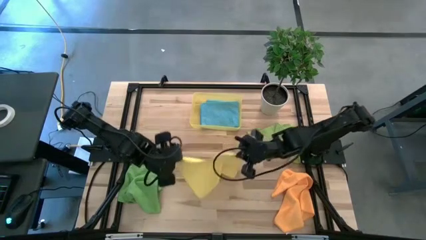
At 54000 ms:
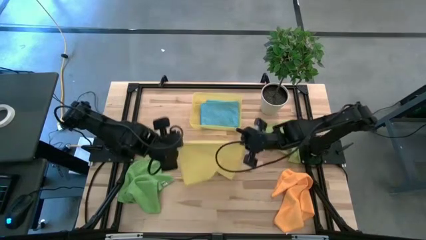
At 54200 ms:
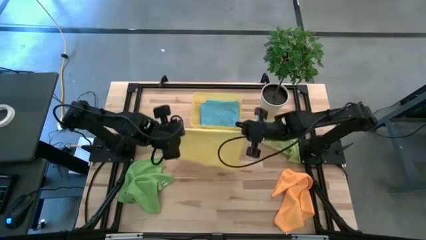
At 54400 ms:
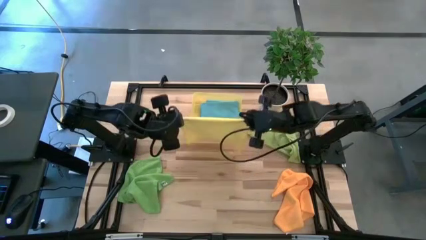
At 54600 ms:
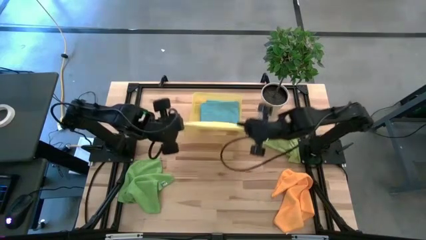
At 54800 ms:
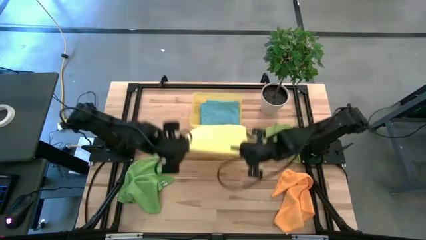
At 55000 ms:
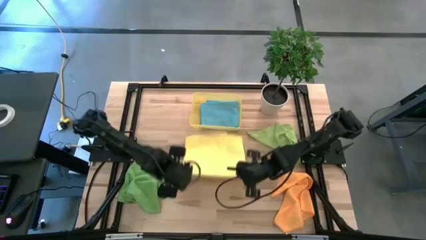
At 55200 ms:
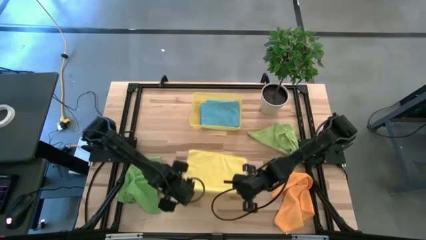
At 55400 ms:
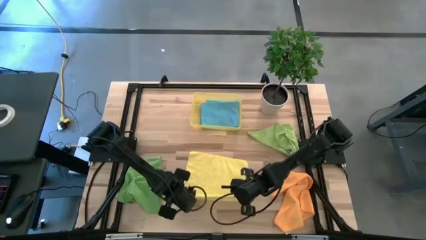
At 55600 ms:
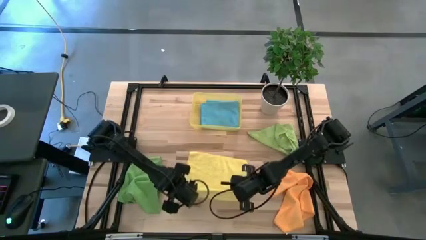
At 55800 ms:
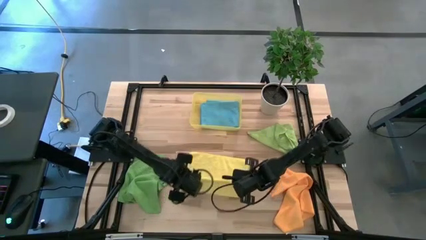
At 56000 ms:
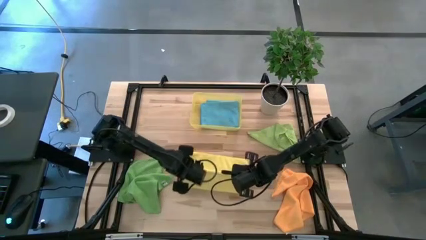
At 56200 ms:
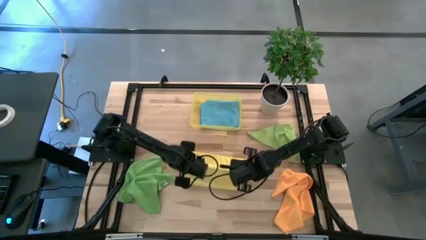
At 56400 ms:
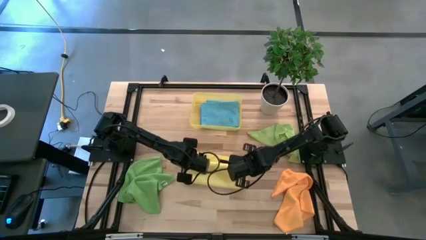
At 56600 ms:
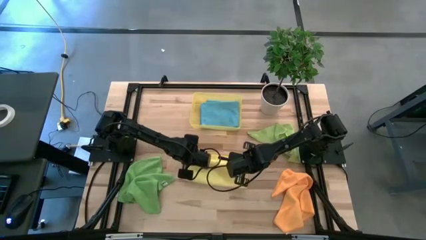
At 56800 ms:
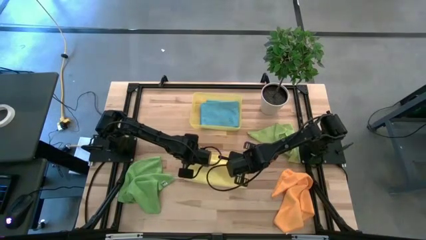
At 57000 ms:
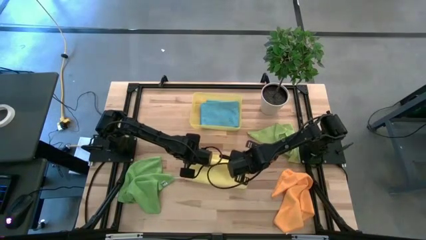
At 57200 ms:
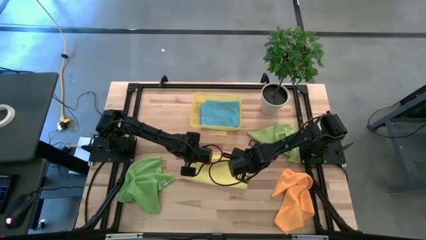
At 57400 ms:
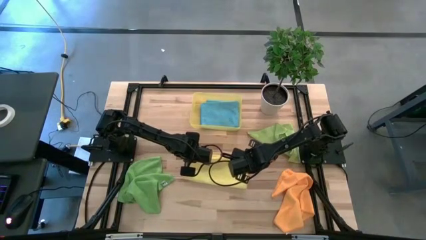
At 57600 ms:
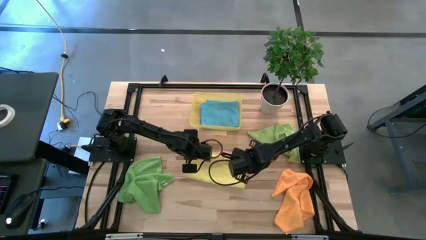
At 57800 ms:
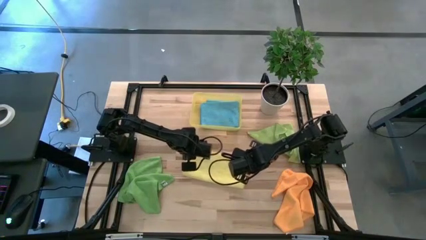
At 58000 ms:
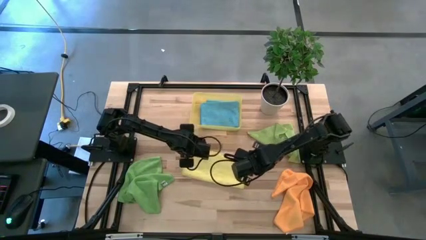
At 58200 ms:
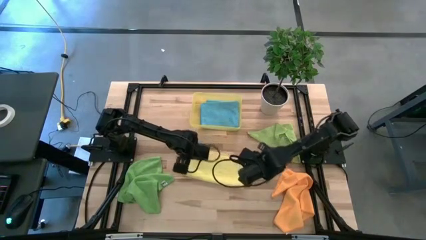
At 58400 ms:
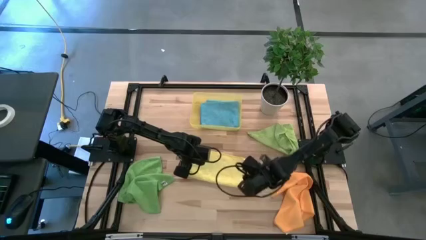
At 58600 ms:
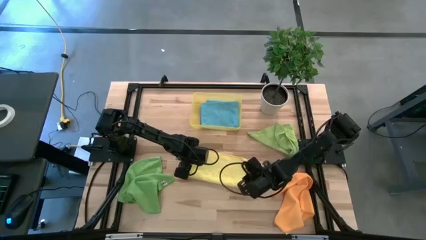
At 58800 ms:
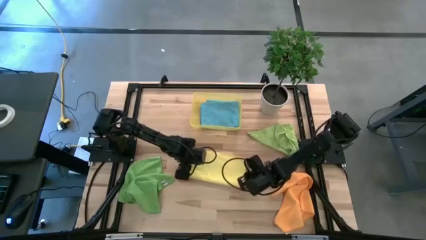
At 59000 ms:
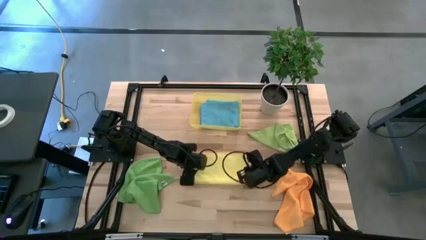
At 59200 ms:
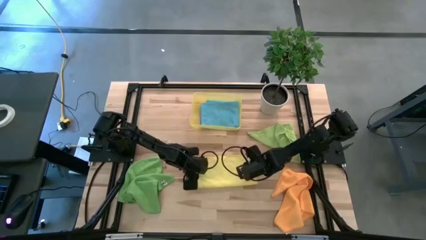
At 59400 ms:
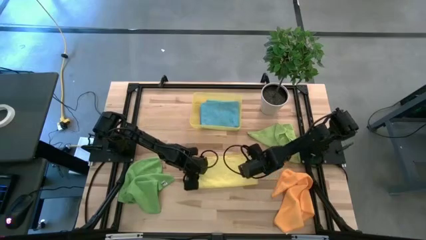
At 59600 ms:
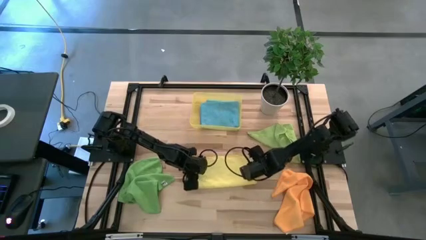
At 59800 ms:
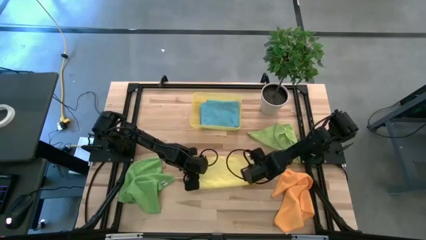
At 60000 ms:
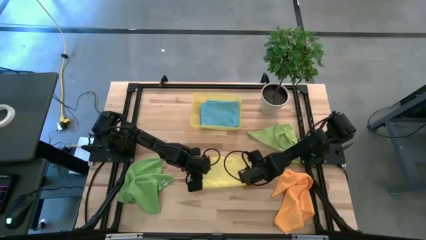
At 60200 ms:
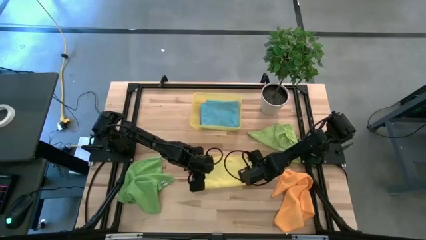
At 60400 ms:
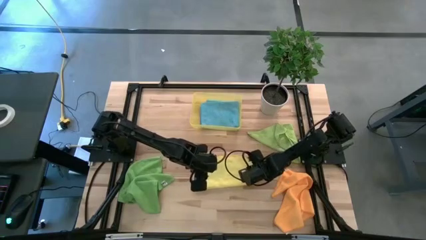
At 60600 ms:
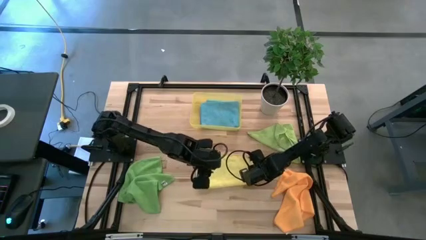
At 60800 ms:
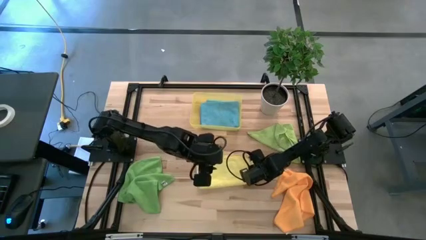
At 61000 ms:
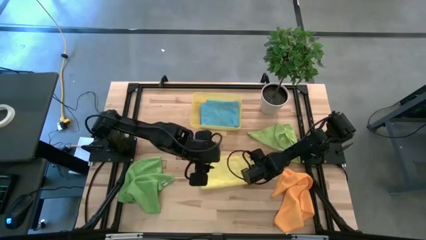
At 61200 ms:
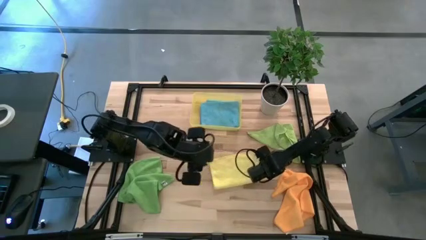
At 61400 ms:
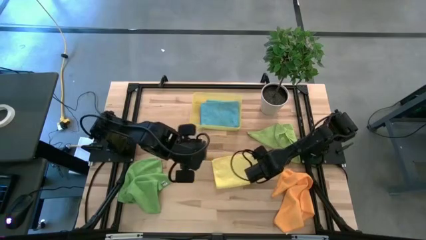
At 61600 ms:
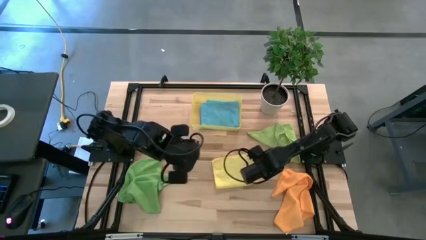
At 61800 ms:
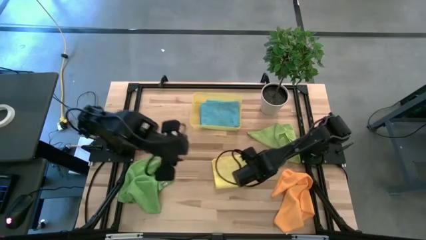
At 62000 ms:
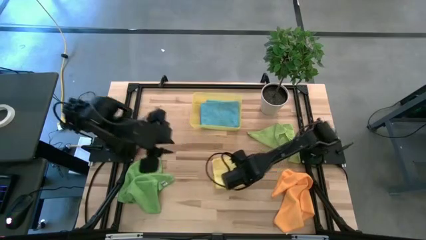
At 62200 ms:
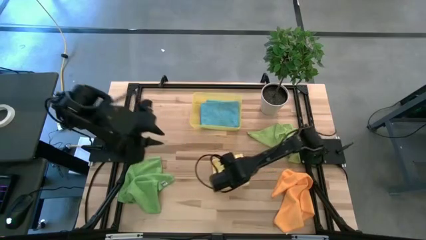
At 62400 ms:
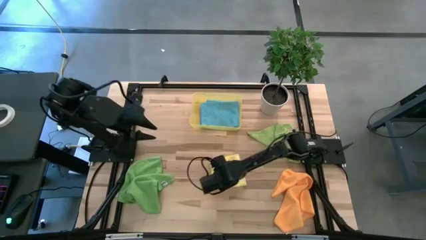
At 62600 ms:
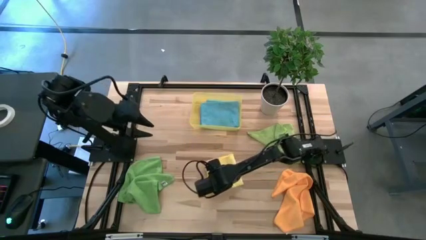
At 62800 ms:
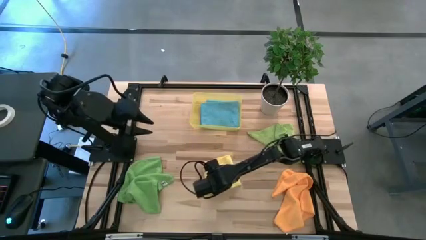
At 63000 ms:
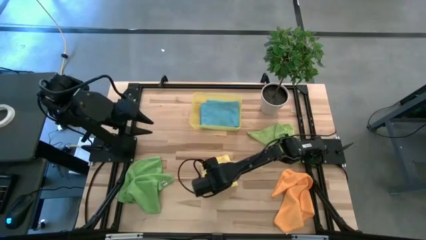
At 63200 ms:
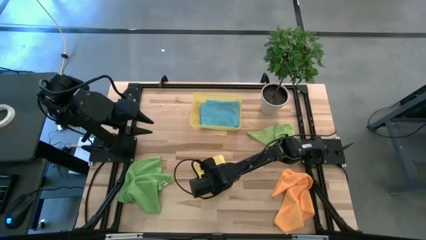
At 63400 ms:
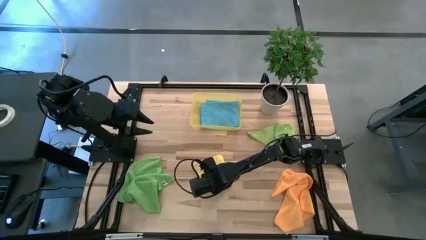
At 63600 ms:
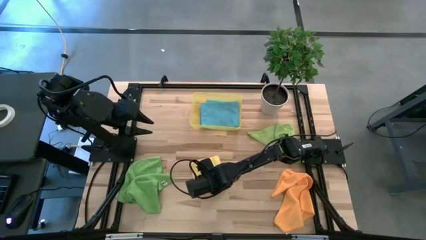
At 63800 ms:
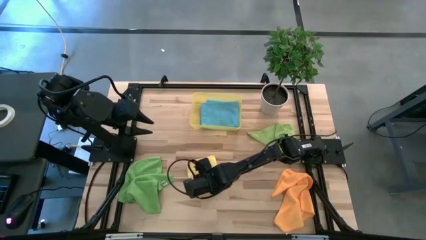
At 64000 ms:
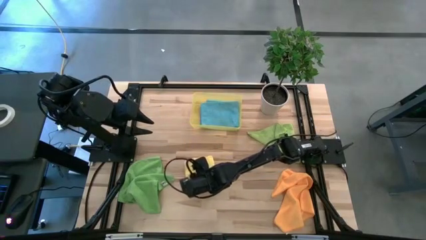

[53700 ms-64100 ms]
Task: Fold microfiber towels
Fold the yellow microfiber cloth

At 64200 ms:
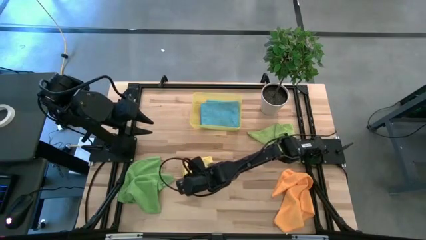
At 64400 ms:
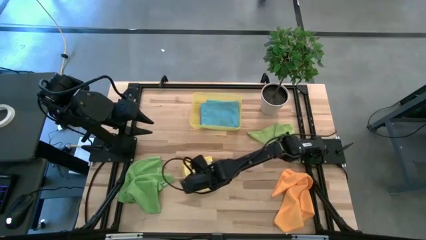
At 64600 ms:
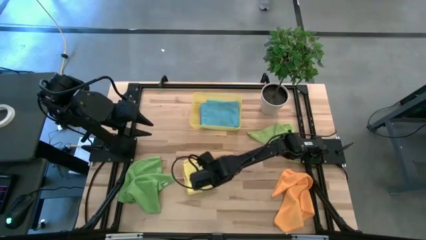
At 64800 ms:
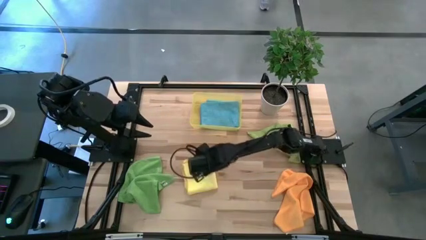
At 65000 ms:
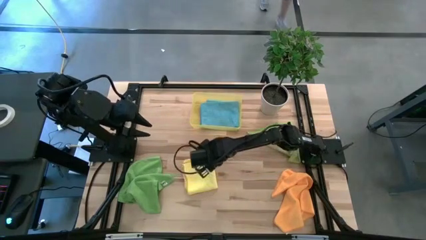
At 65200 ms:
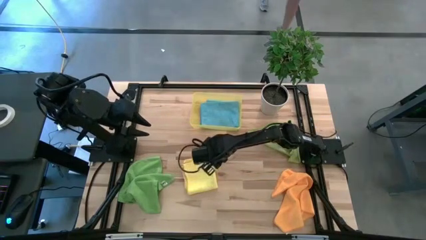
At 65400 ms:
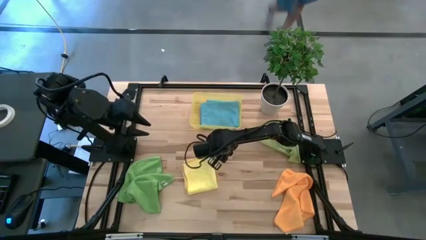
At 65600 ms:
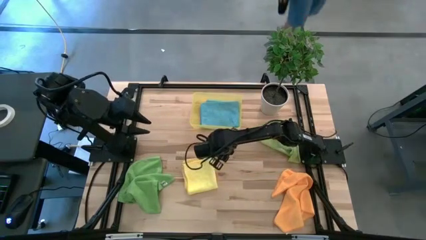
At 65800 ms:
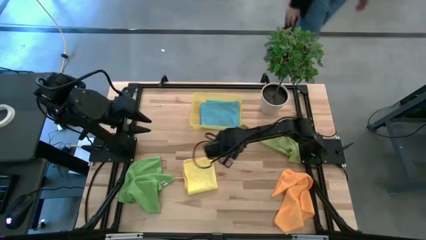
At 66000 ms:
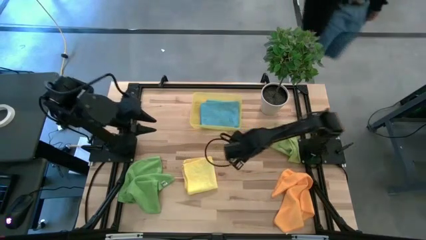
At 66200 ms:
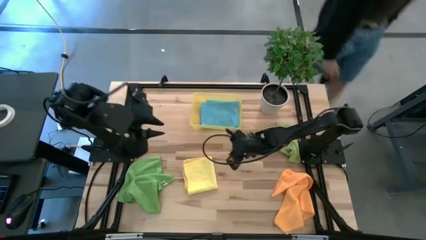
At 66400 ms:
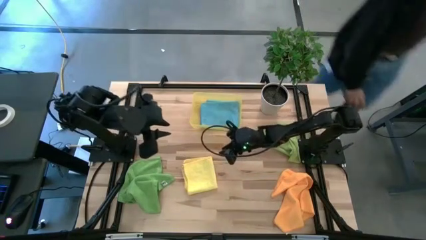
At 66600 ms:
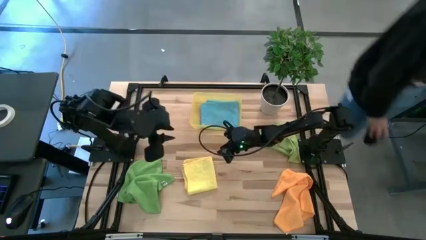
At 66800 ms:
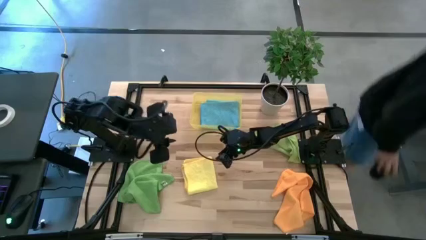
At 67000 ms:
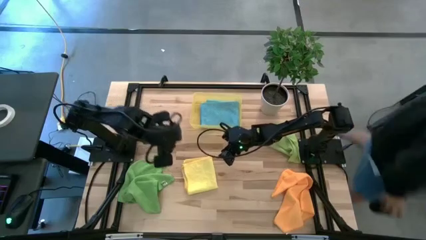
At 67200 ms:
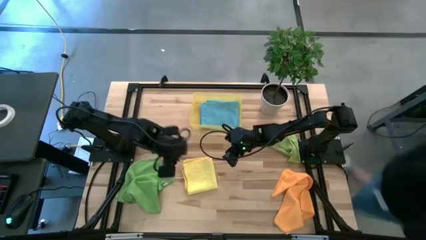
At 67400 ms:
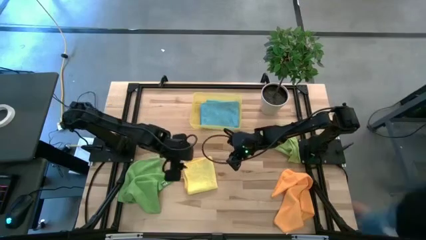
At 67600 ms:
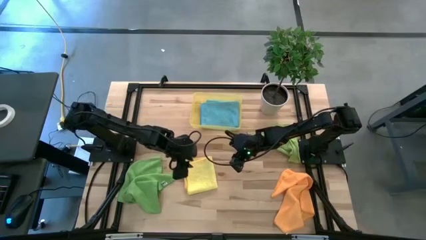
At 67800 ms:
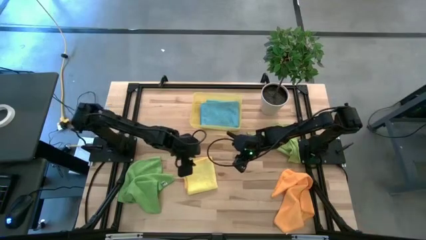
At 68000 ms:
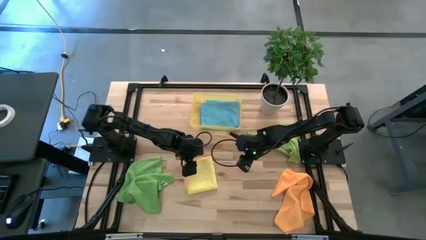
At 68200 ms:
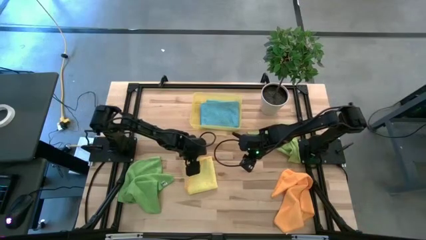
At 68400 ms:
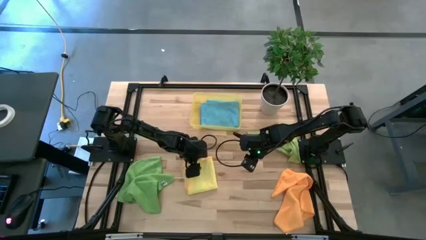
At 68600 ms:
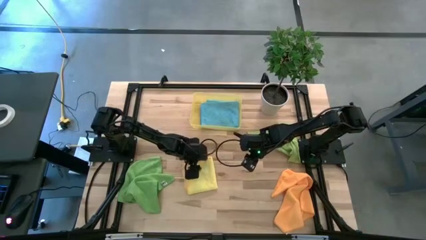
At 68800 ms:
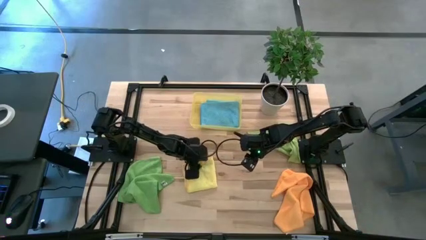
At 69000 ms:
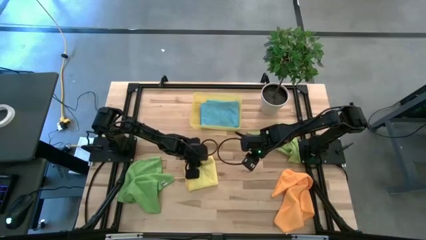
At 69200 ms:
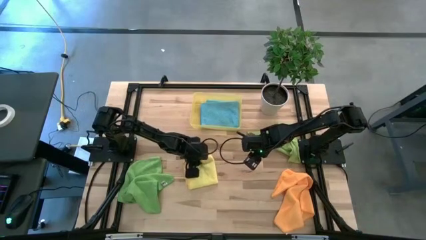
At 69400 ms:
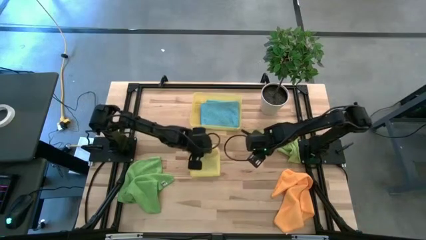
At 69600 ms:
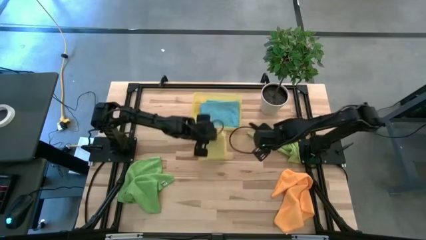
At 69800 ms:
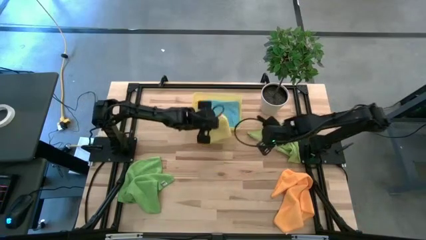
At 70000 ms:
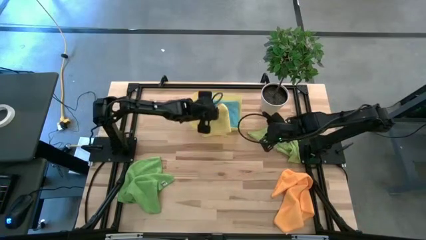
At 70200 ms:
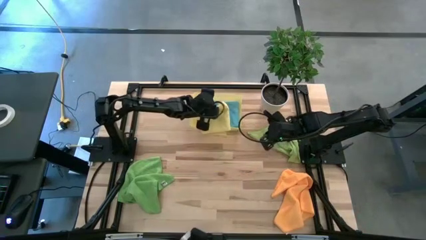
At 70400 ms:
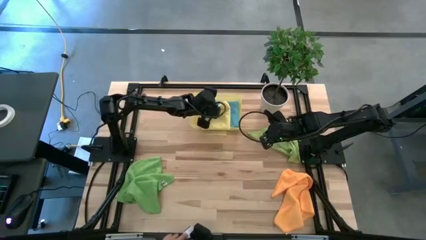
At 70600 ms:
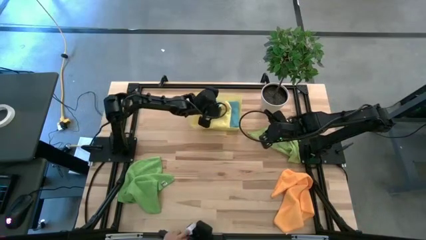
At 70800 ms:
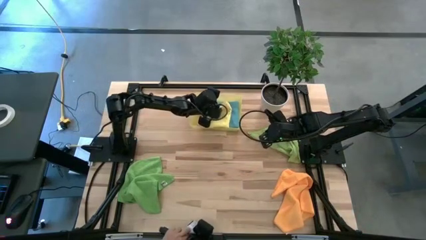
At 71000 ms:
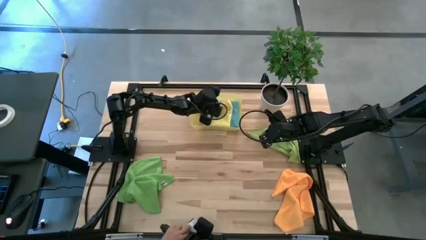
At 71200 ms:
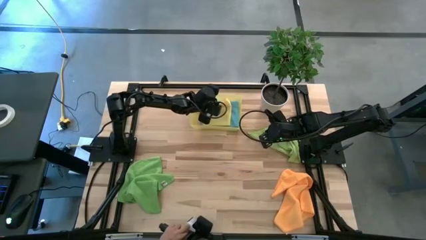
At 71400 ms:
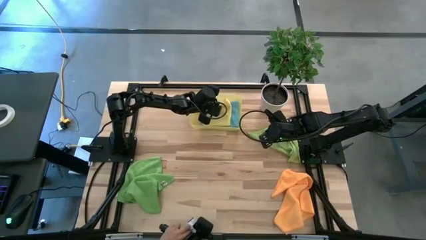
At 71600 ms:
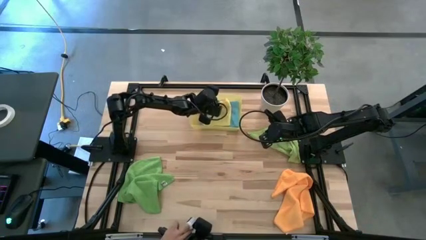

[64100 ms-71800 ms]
Put the folded yellow microfiber cloth into the yellow bin
